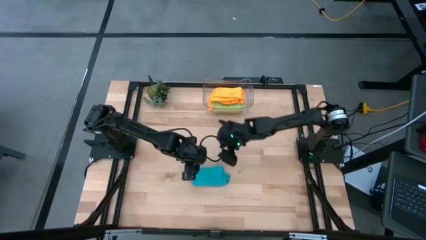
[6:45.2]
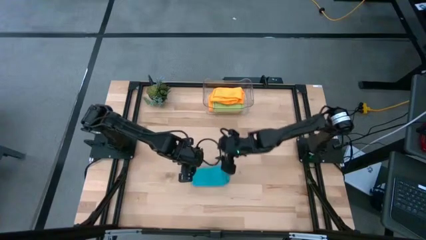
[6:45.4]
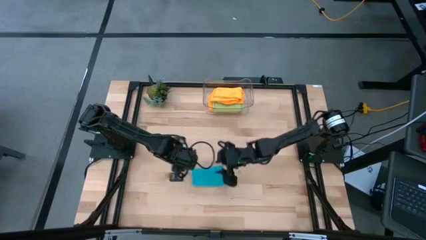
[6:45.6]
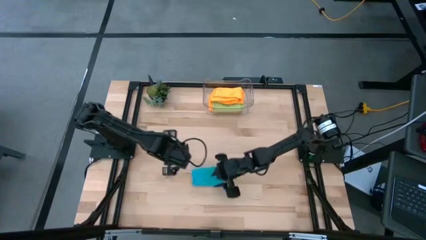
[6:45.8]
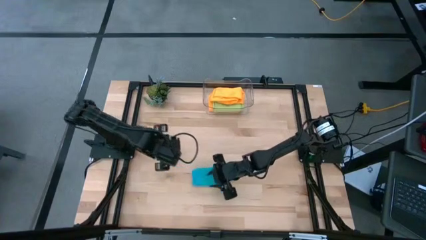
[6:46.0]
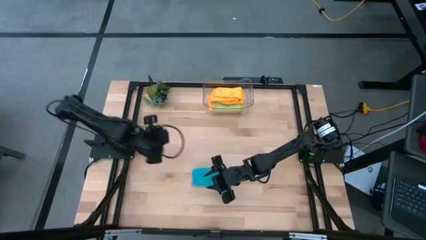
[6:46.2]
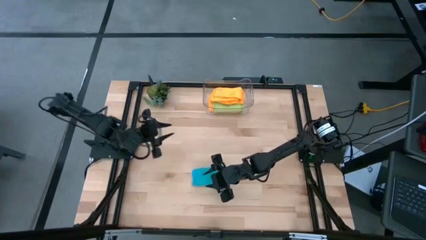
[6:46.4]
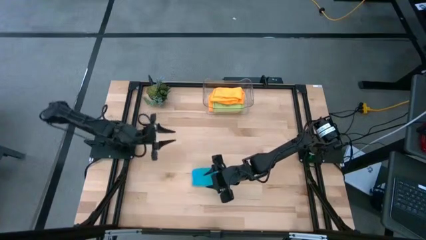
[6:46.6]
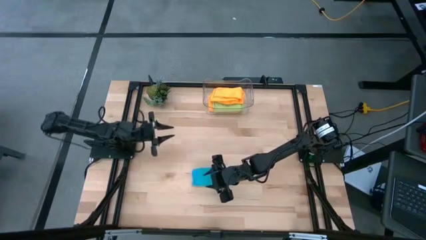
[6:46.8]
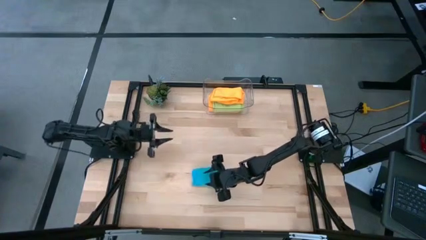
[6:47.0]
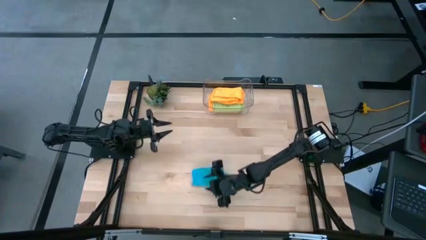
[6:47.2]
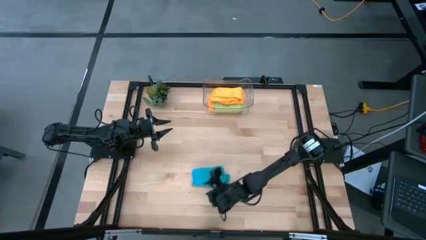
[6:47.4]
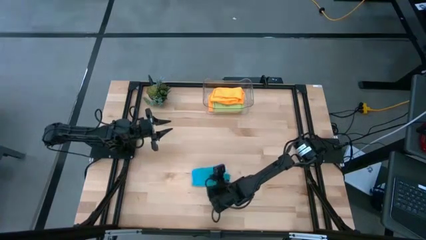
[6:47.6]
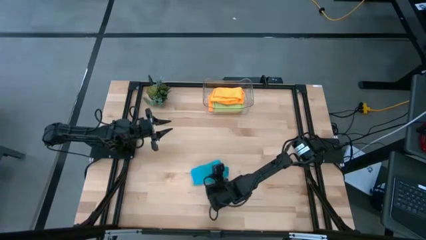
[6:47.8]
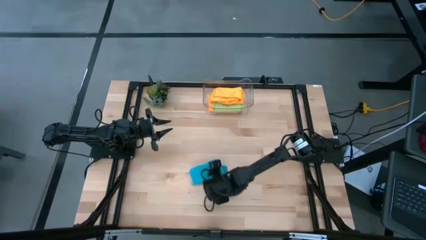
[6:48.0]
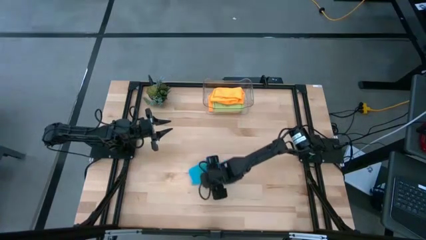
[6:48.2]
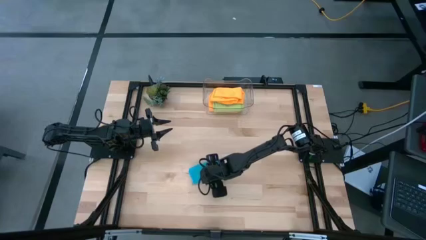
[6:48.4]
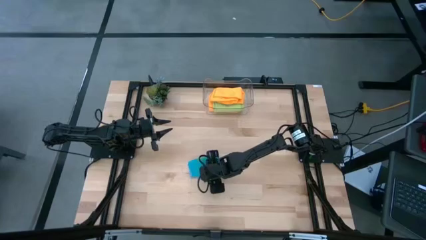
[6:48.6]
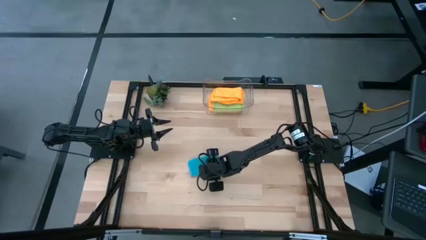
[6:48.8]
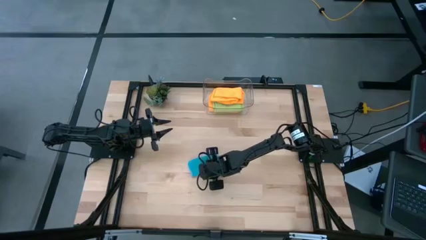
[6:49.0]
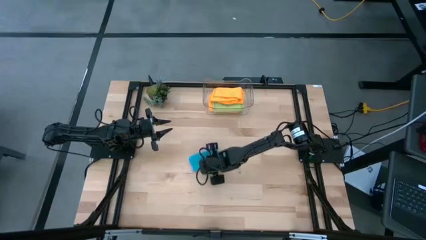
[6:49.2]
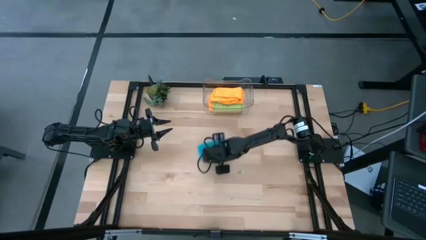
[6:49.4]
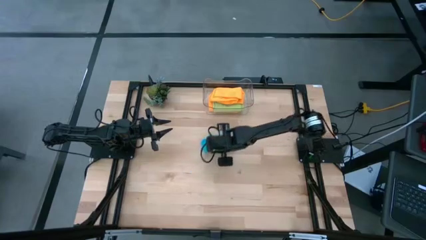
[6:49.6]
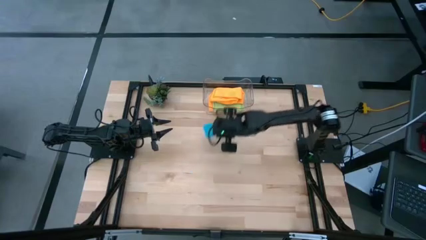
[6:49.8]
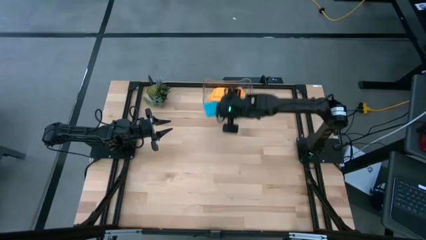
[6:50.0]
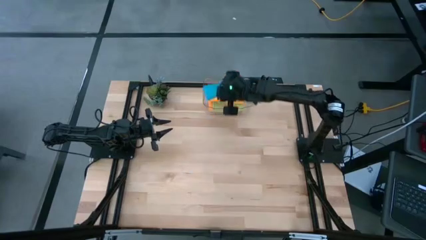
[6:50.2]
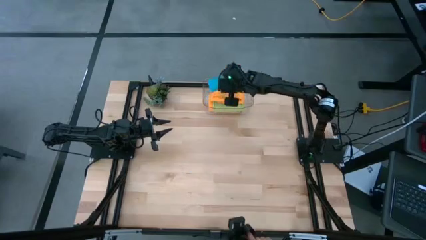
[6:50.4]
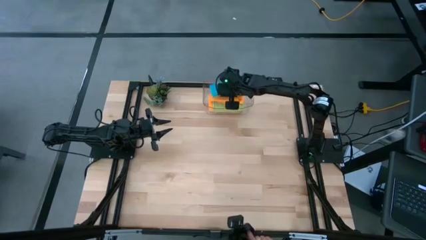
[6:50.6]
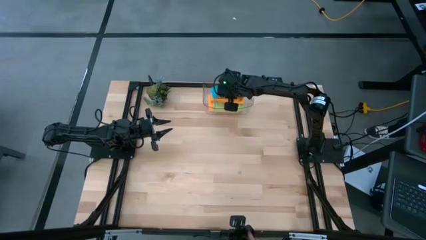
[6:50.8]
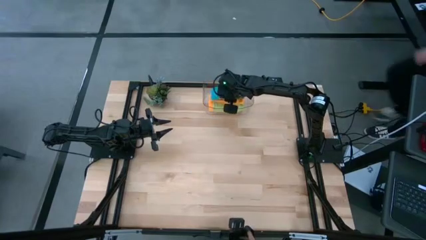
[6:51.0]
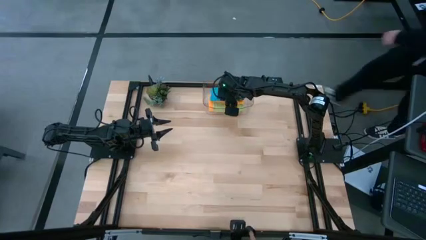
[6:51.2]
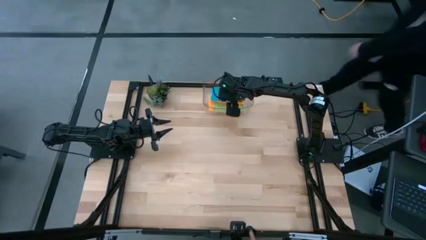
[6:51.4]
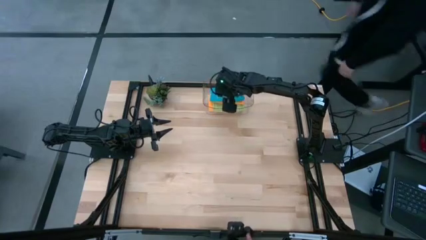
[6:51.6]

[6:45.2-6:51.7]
Task: Fold microfiber towels
Put the blue microfiber cloth into the transparent bin

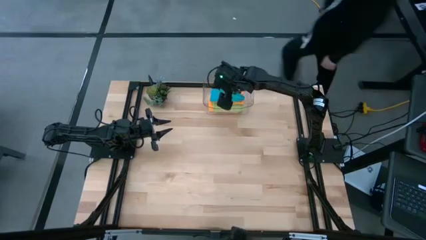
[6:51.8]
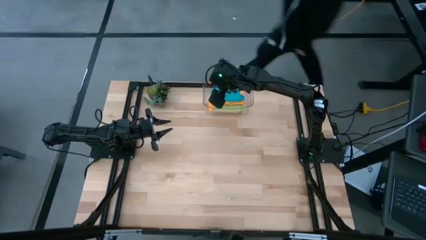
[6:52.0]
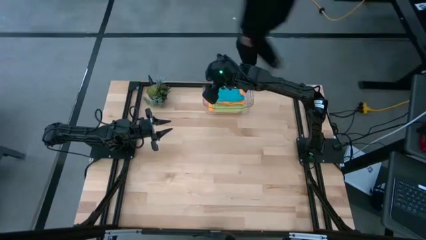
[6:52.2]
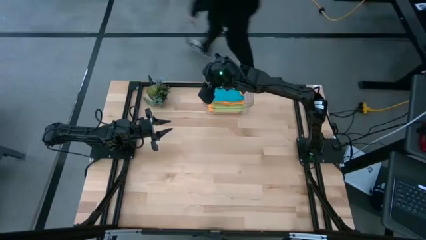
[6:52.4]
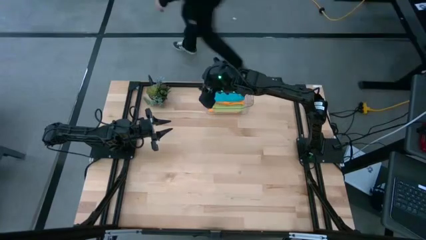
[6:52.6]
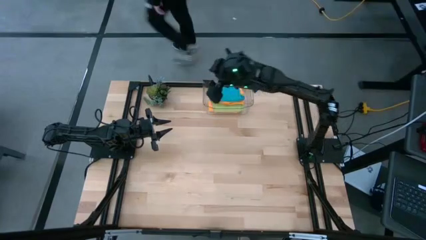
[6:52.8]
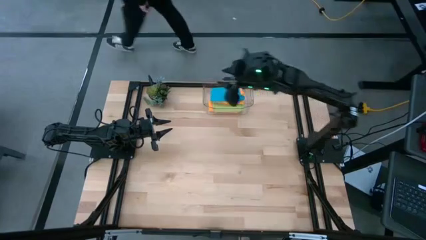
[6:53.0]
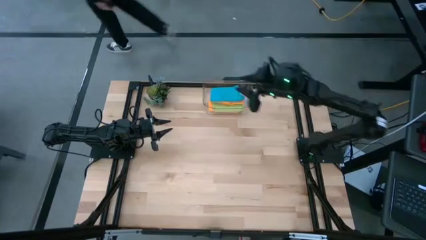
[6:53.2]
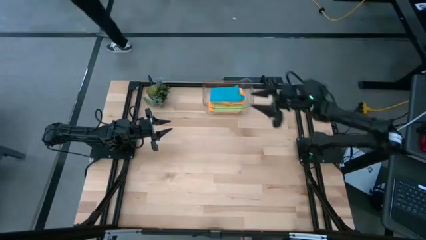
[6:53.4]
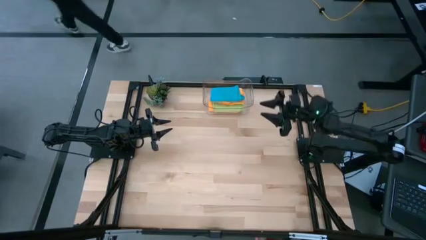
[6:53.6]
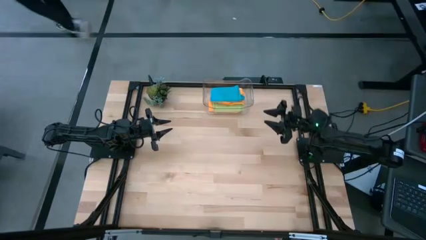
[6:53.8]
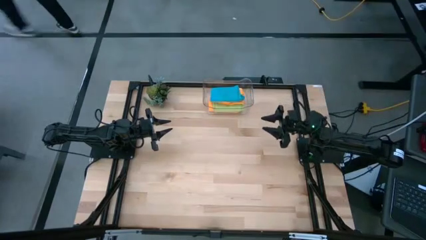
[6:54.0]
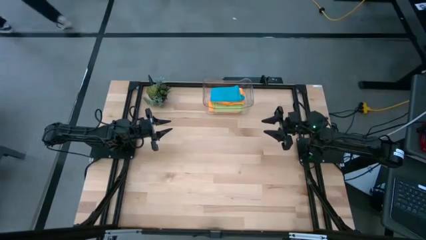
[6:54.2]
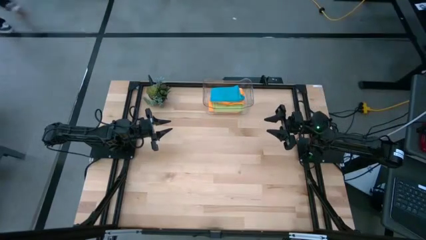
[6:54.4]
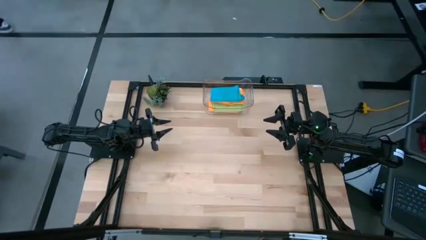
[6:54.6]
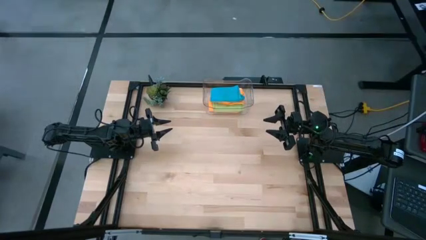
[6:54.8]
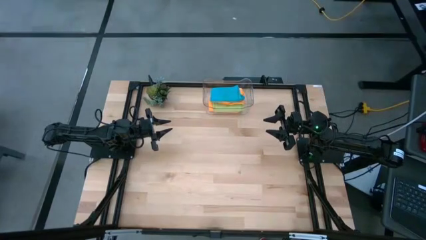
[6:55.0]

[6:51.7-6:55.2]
Return to Home Position

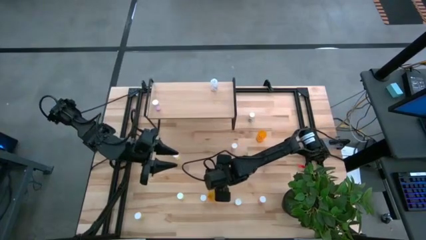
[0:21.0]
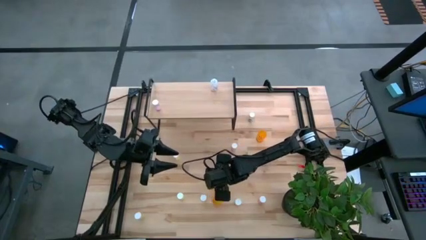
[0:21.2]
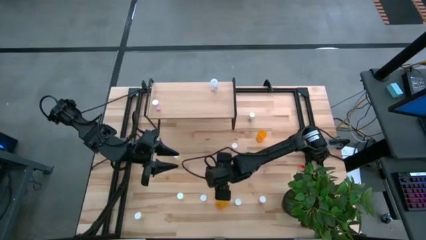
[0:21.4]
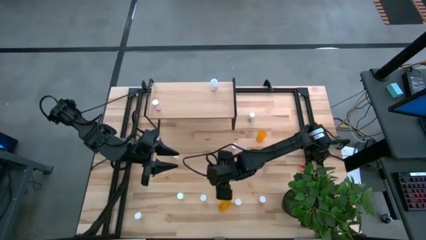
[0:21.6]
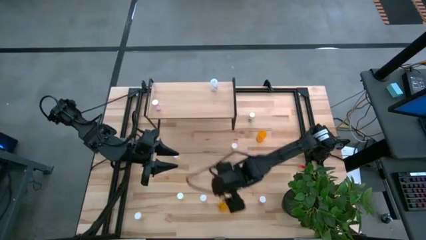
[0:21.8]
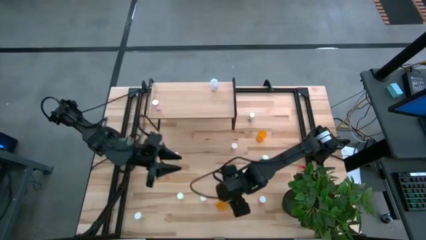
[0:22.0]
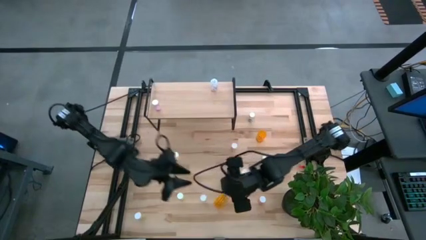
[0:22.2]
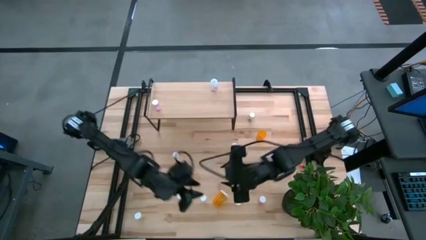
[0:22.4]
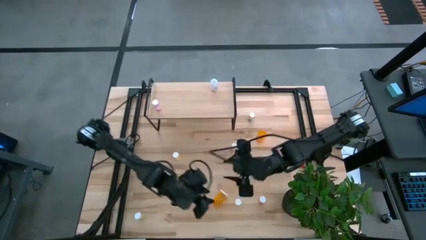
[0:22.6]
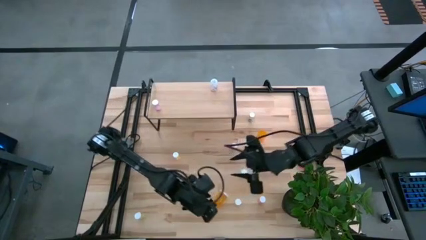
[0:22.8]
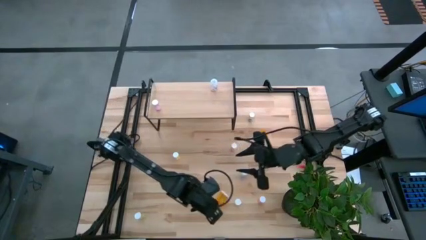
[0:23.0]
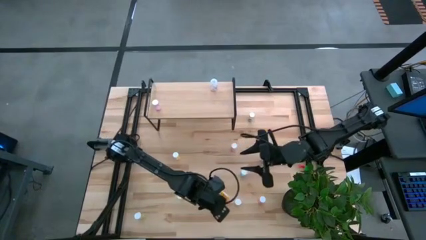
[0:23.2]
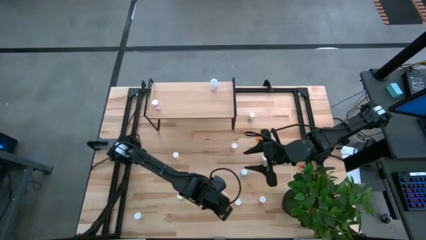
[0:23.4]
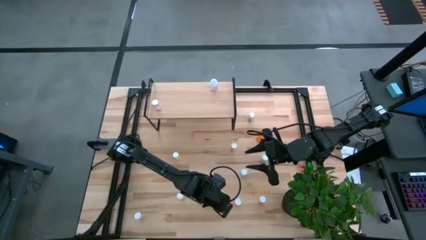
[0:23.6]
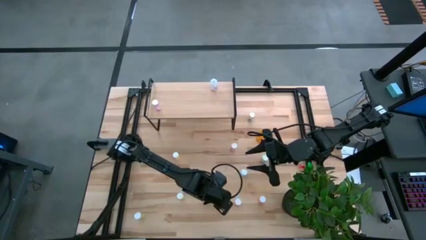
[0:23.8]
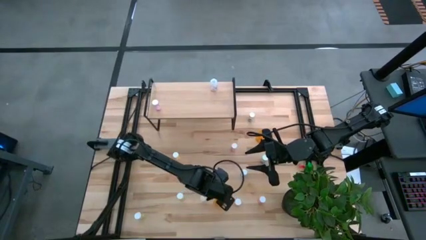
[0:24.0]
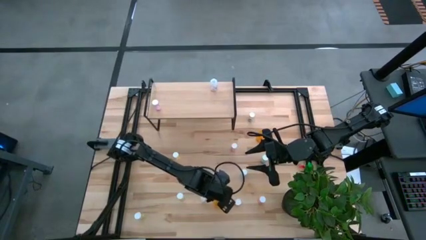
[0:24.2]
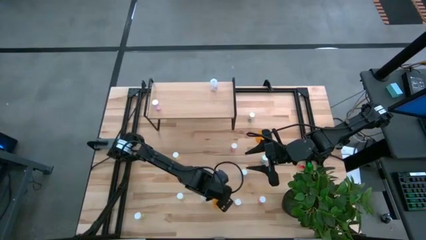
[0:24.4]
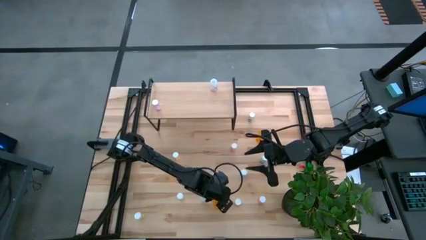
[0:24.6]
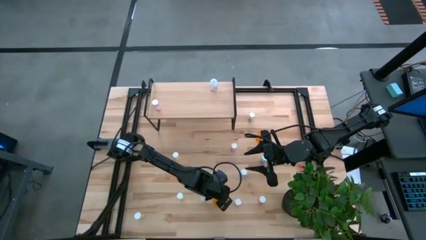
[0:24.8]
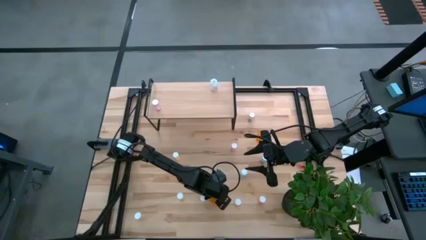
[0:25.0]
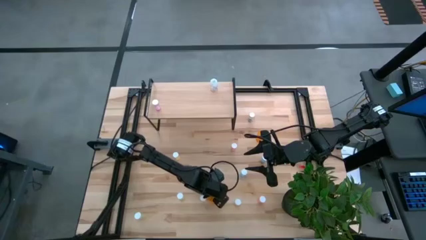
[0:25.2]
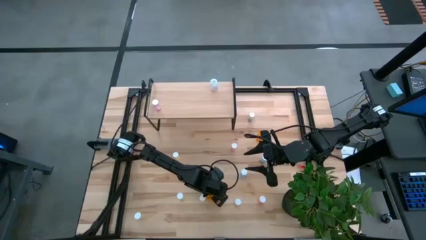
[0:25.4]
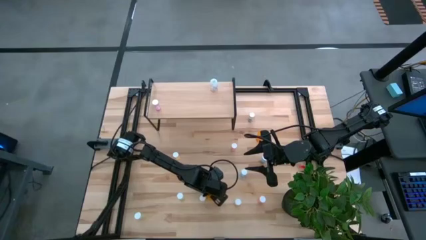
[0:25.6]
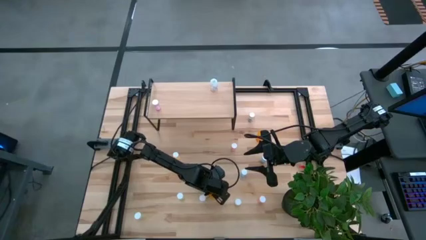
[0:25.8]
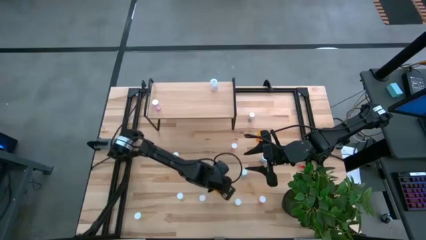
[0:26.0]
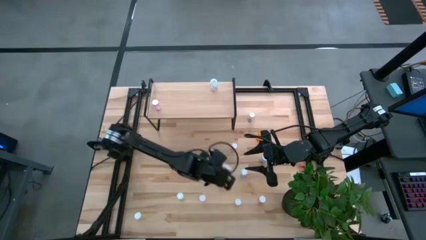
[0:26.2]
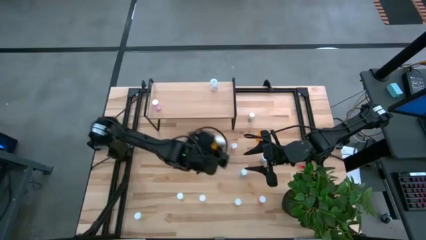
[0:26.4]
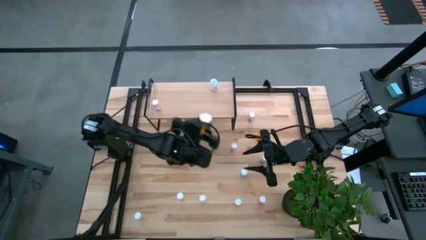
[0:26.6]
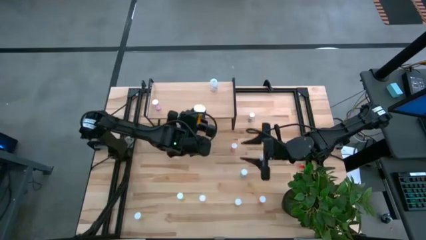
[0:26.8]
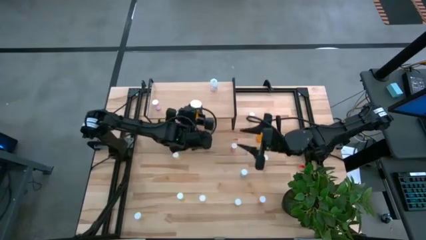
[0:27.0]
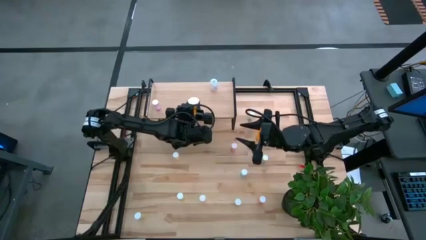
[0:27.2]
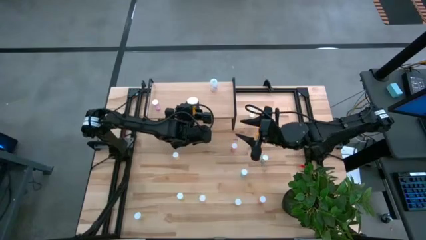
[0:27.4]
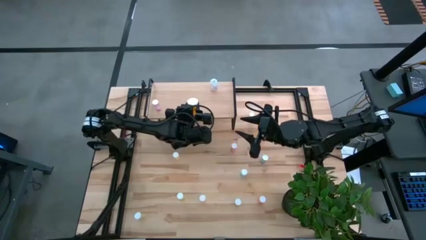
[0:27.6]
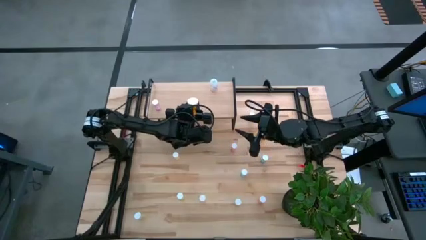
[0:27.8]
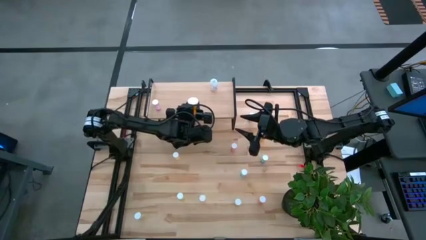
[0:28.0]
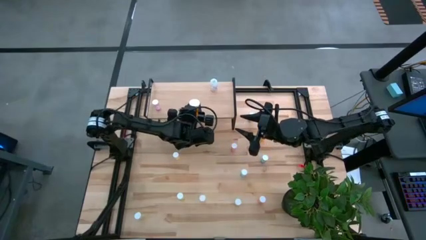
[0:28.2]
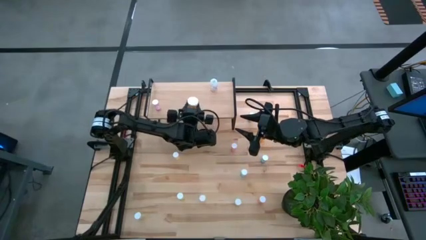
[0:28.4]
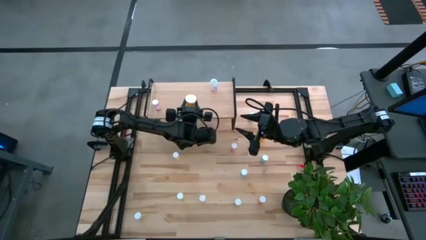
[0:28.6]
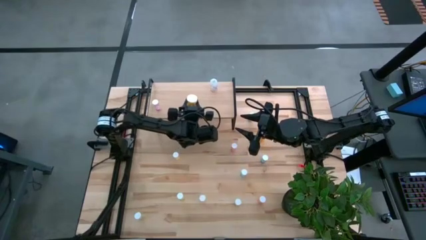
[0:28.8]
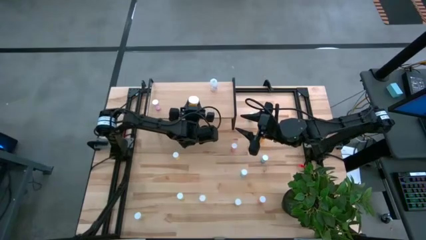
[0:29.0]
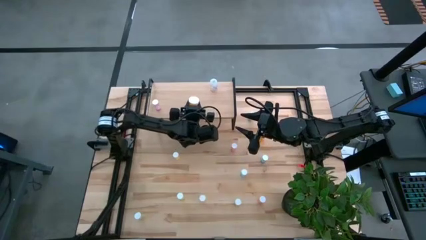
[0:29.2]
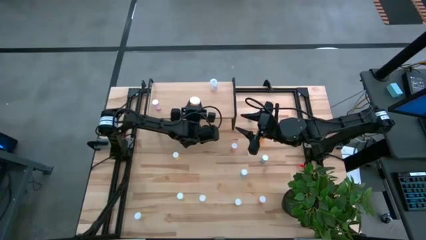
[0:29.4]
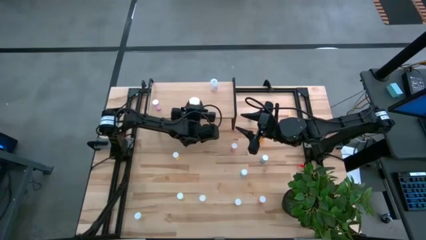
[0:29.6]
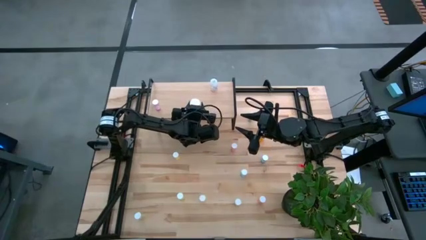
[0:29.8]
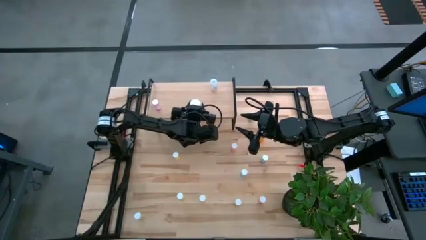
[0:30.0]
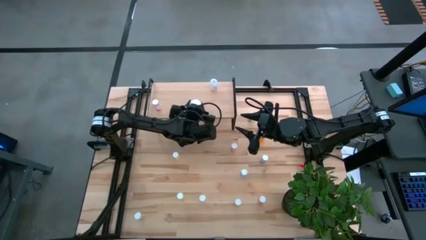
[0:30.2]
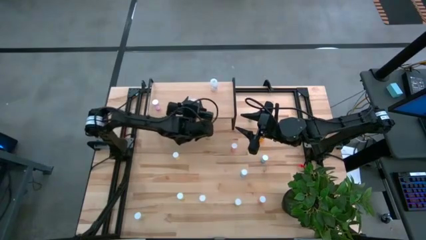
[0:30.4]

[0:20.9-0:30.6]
Task: Pick and place medicine bottles onto shelf by color
Put the orange pill bottle on the shelf
